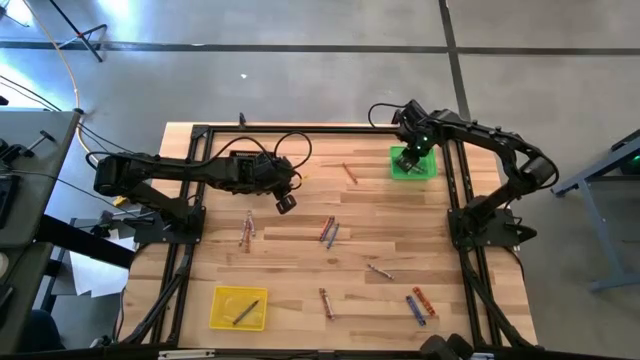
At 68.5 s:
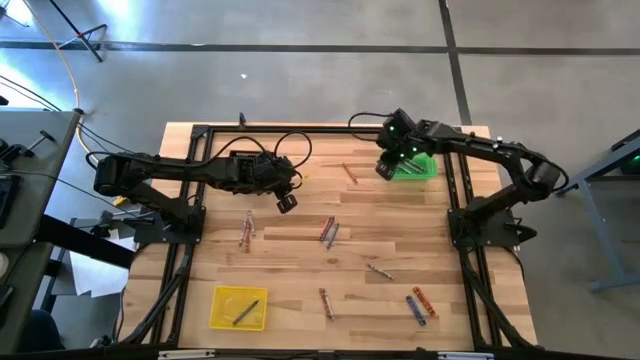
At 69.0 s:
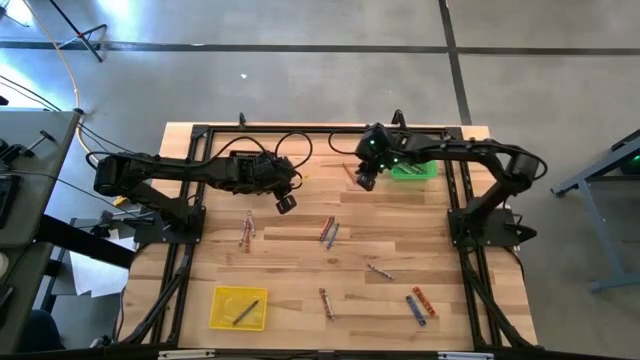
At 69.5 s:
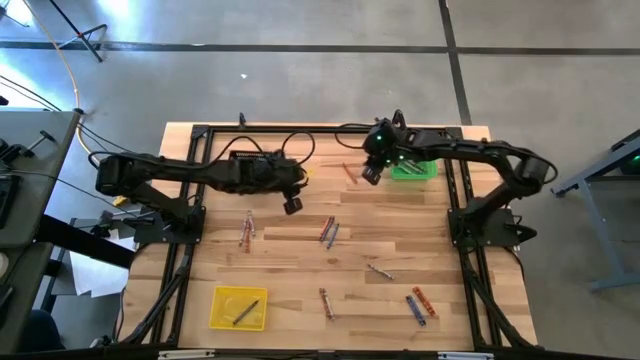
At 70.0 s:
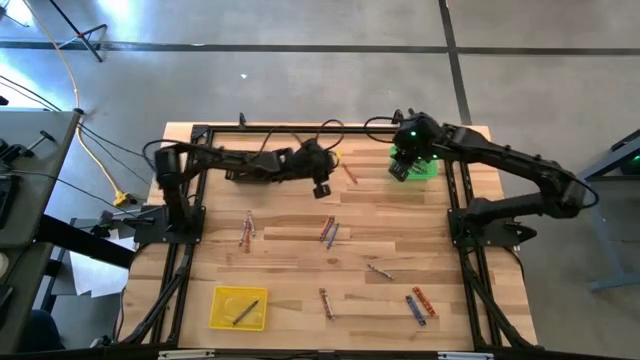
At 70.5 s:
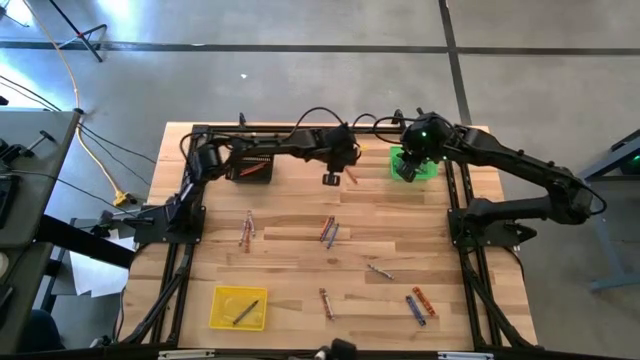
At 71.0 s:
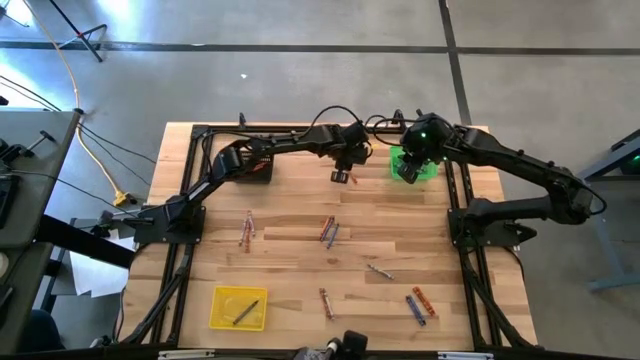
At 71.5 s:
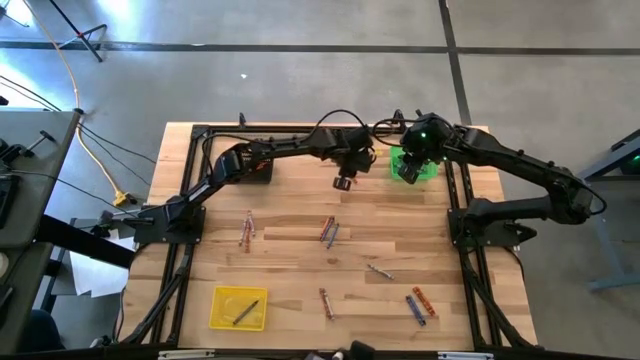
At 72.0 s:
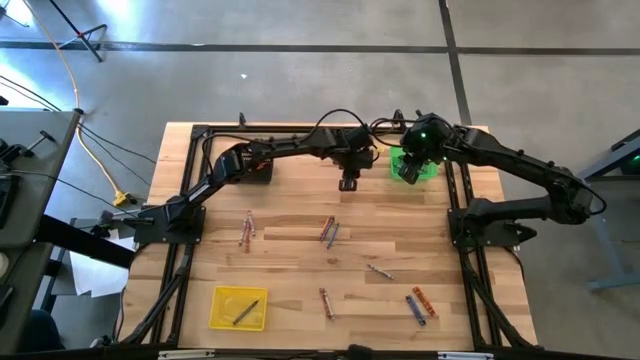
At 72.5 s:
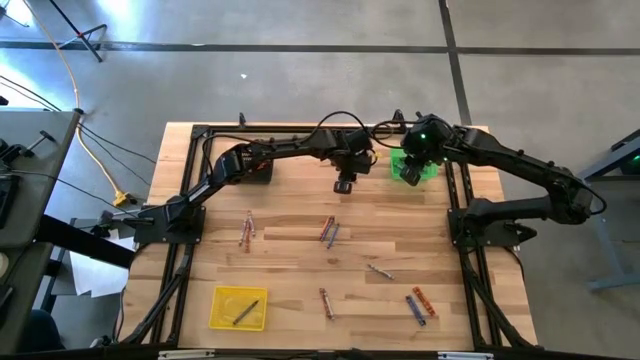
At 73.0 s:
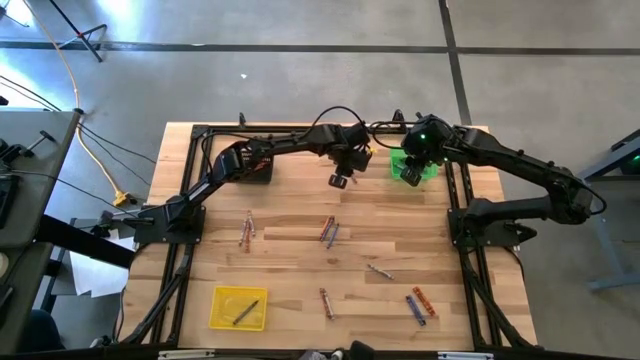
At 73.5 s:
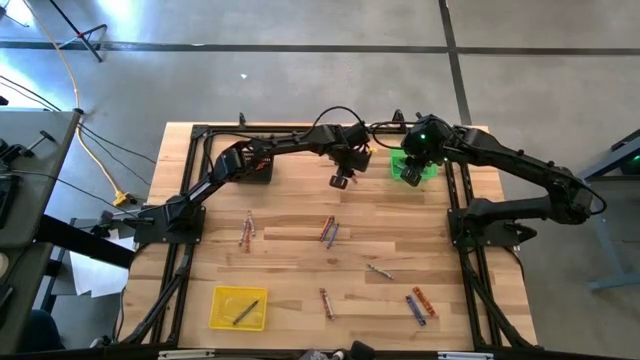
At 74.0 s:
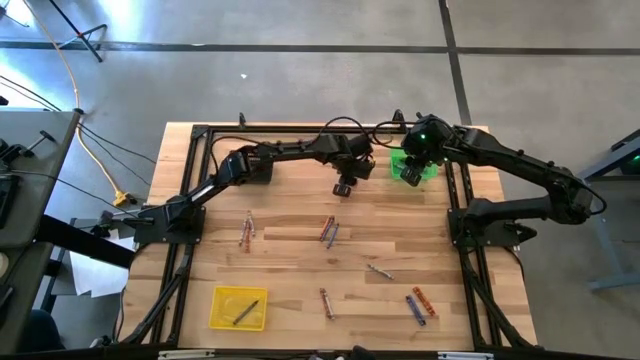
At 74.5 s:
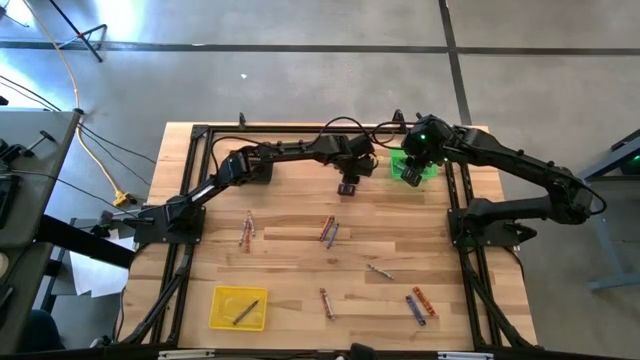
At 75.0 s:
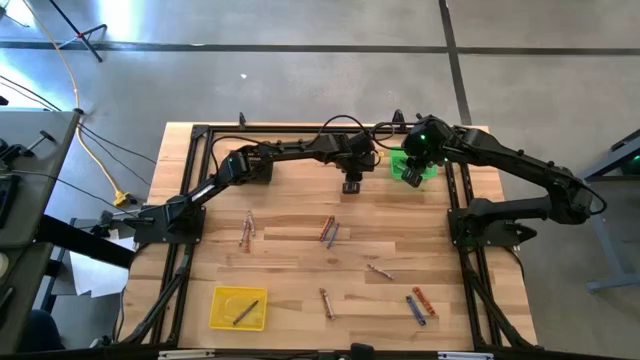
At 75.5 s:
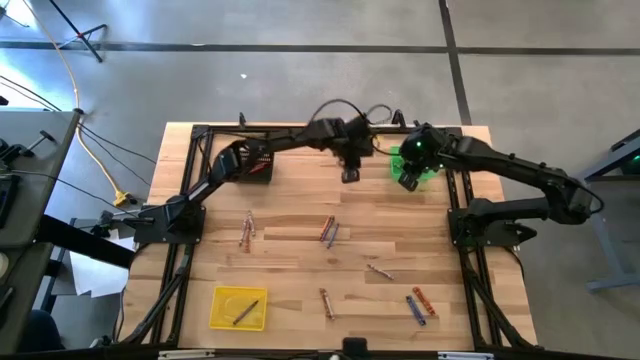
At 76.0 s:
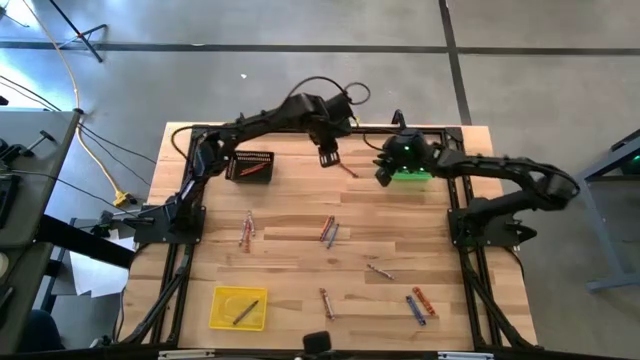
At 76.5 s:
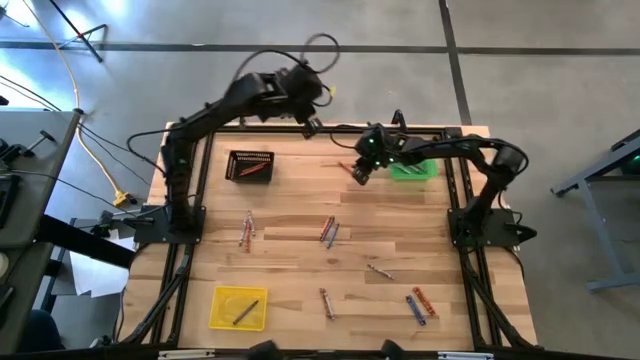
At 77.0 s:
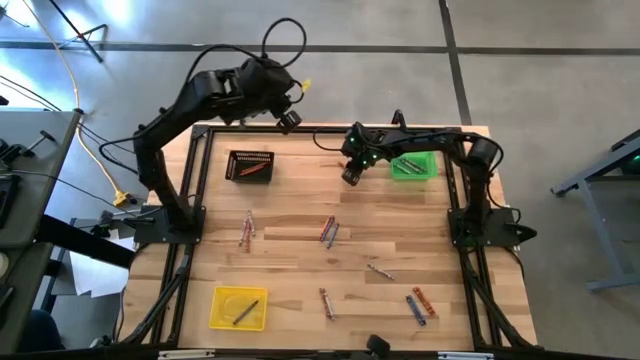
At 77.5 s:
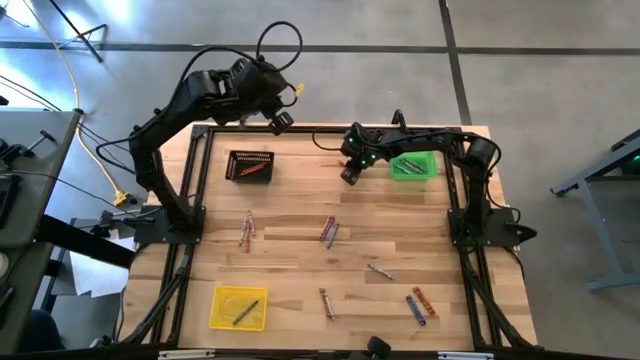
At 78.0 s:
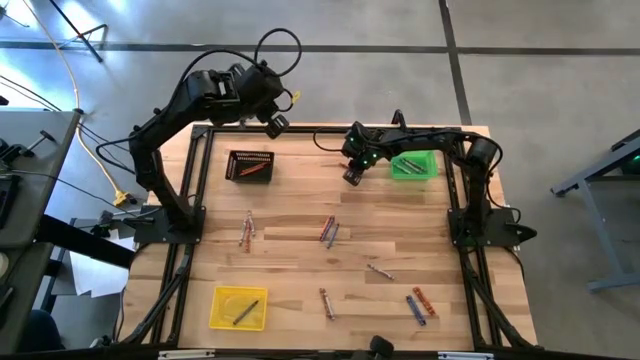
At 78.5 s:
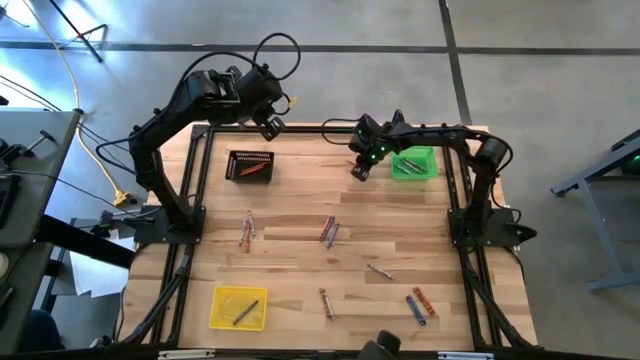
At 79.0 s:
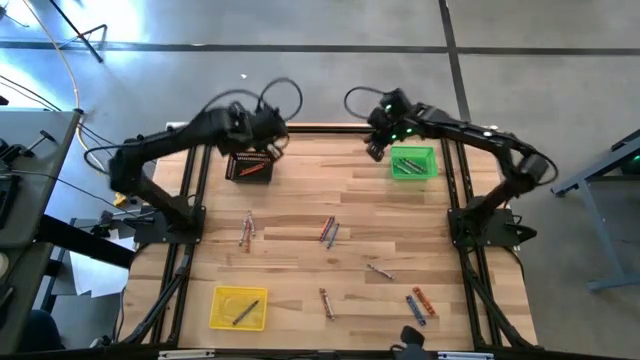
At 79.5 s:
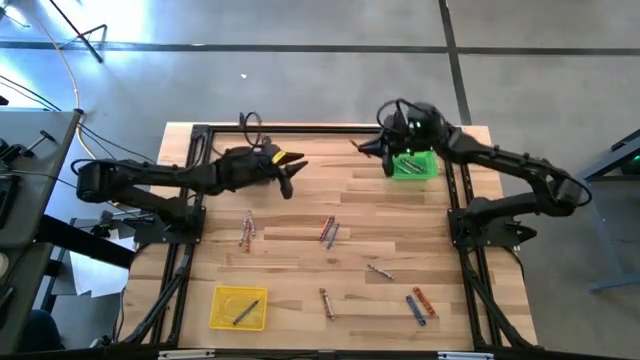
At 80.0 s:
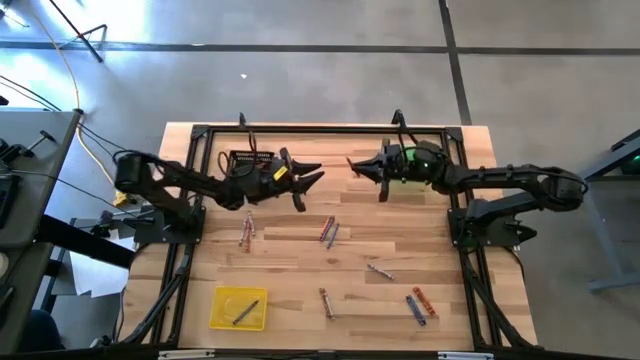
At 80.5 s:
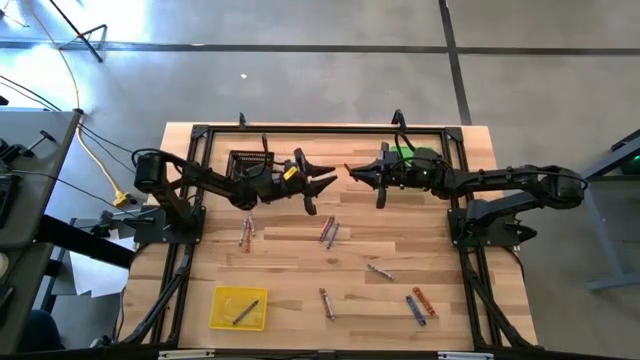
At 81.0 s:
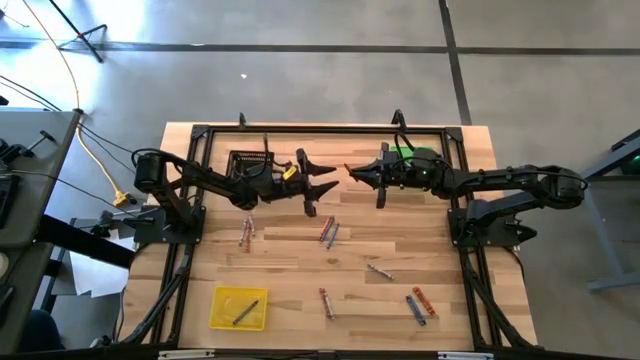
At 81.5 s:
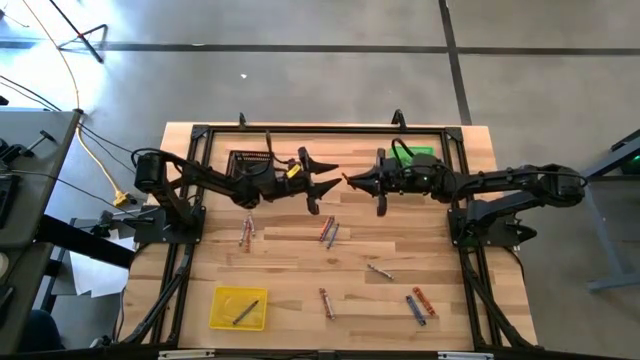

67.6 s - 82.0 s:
Task: Sort crayons
Put the orange crayon into the black bin

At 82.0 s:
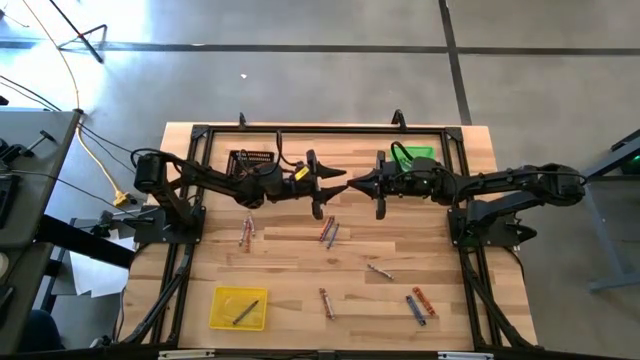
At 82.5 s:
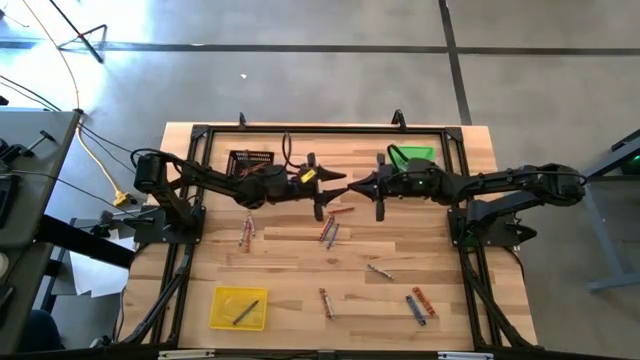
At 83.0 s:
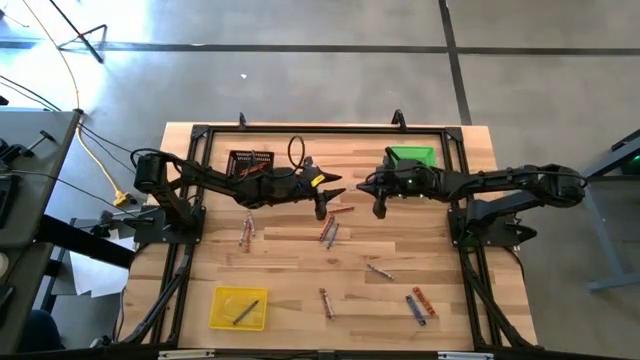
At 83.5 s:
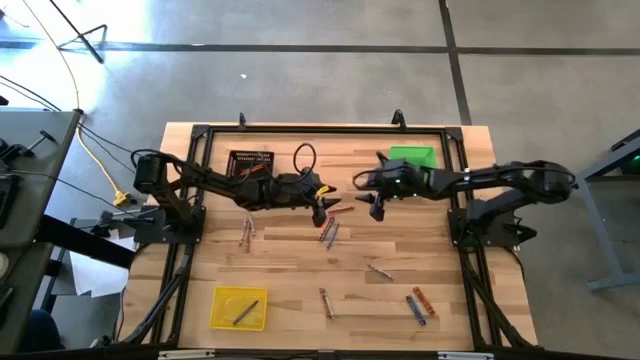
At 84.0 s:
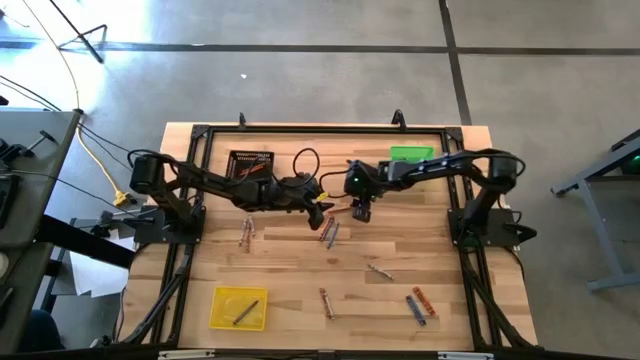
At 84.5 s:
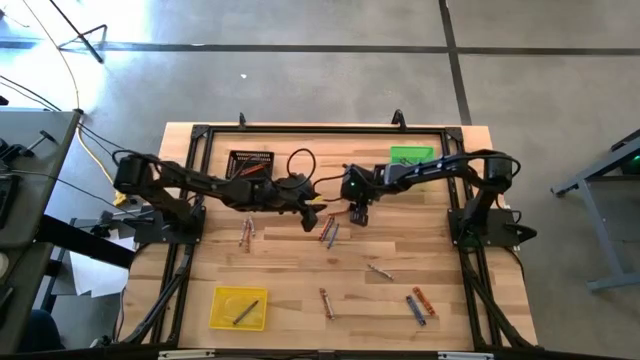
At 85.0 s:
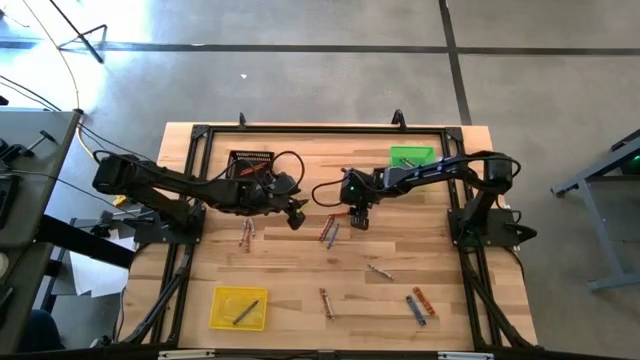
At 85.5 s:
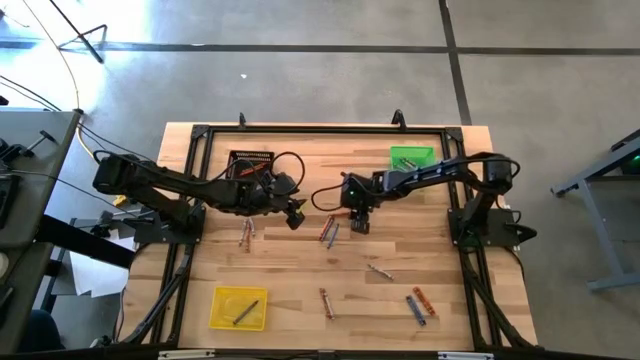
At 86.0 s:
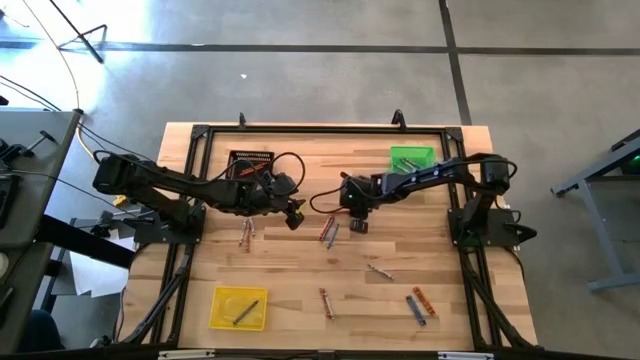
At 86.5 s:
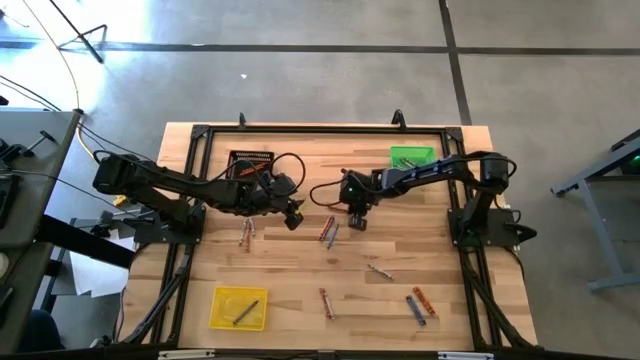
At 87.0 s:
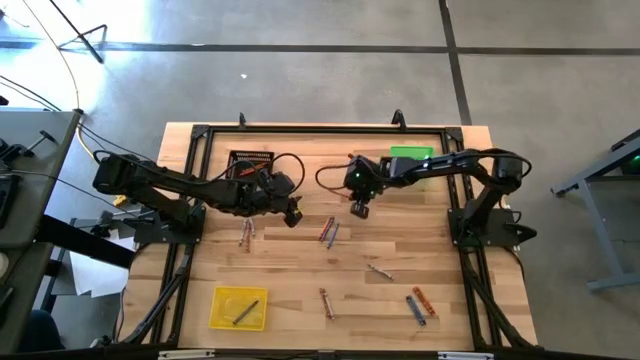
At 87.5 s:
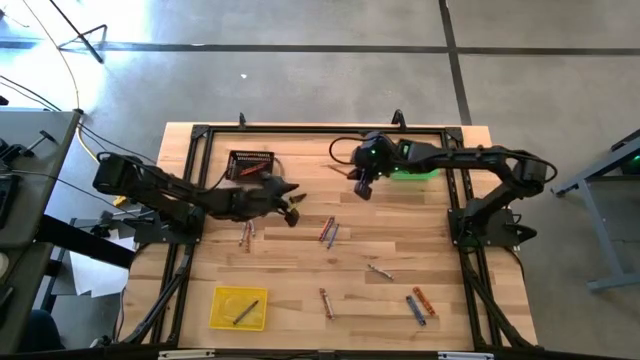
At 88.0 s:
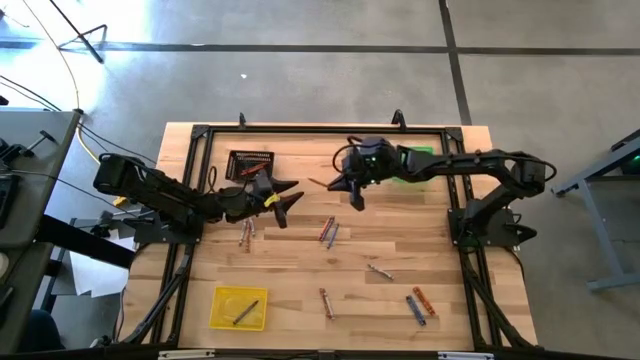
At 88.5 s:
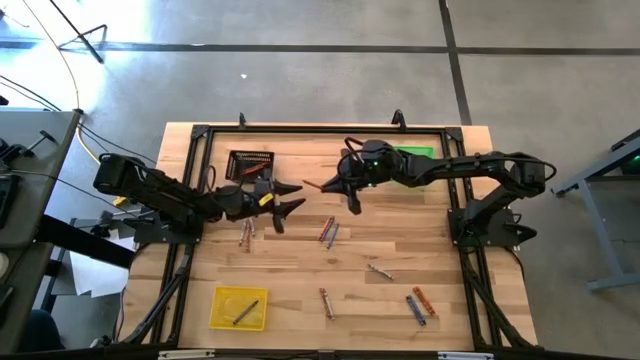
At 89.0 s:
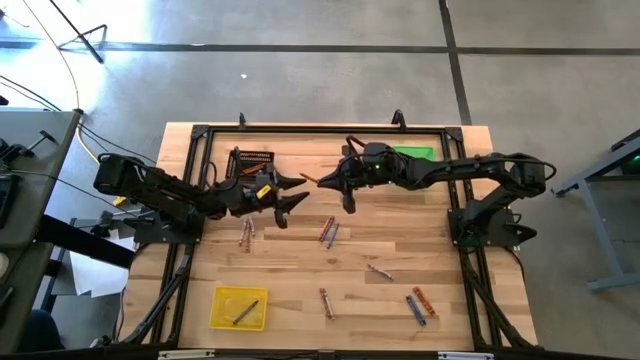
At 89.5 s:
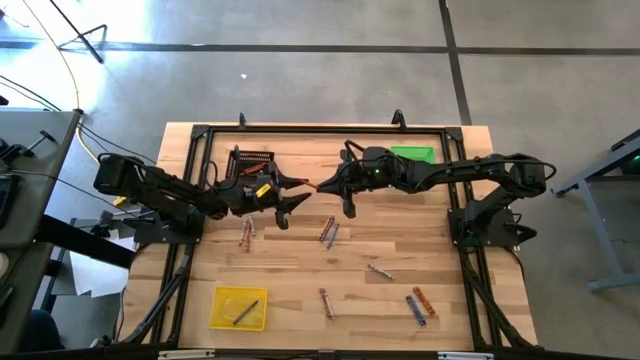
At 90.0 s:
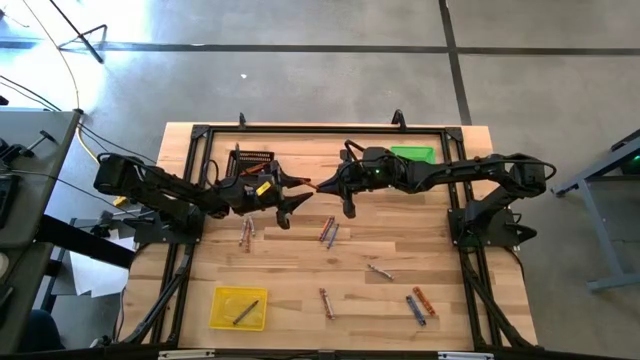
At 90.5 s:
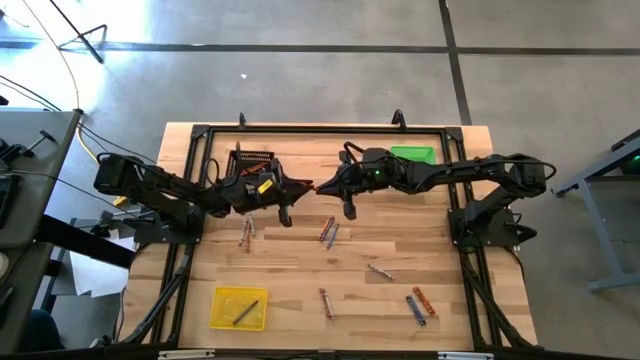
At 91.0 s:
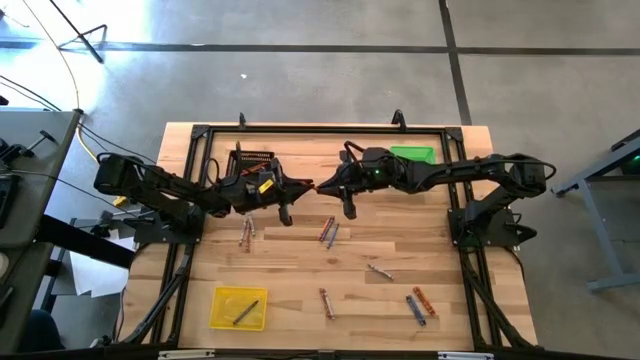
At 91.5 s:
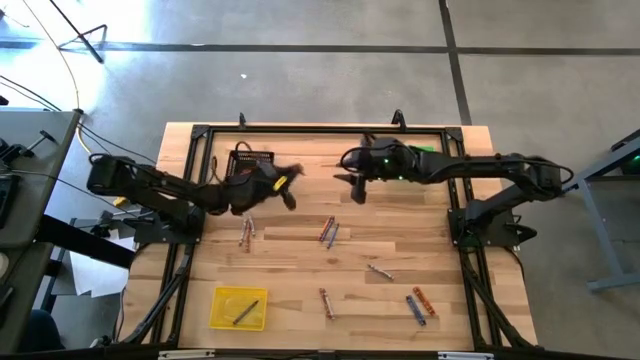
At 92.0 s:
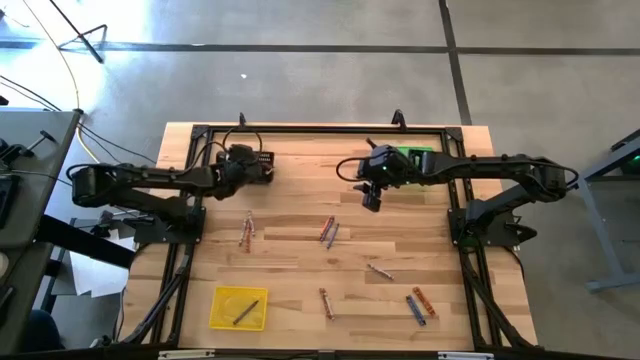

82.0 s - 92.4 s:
Put the orange crayon into the black bin
